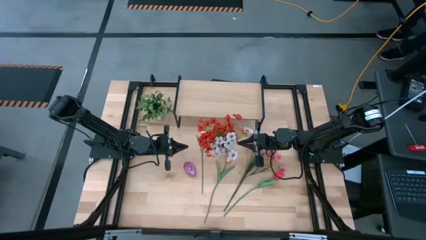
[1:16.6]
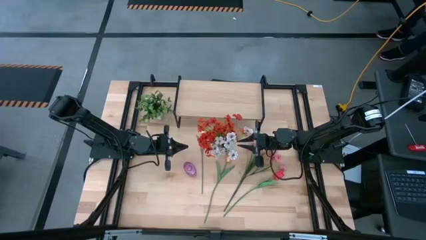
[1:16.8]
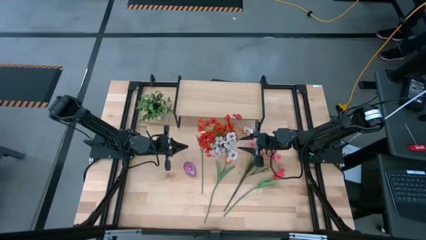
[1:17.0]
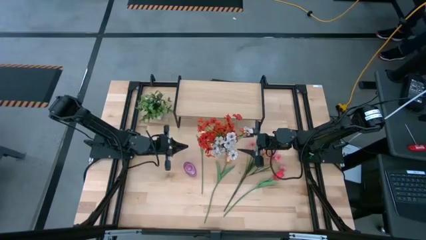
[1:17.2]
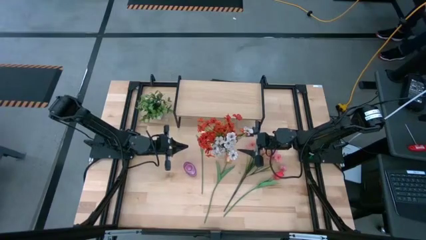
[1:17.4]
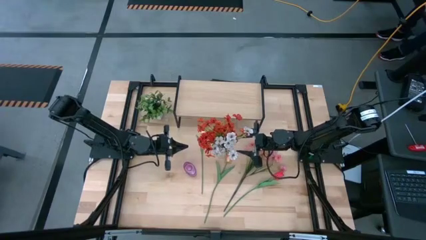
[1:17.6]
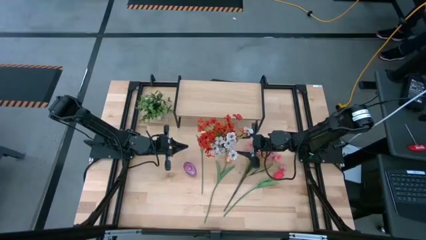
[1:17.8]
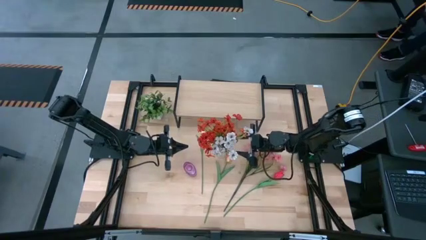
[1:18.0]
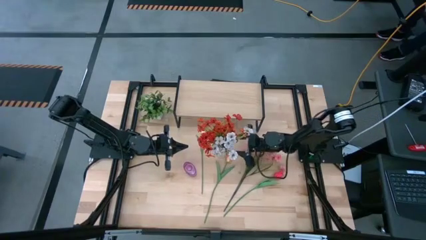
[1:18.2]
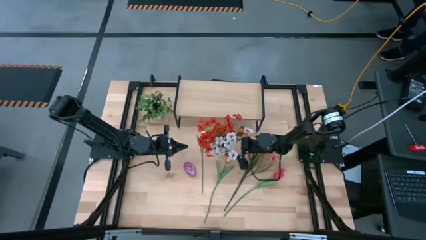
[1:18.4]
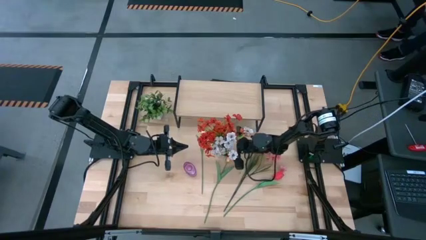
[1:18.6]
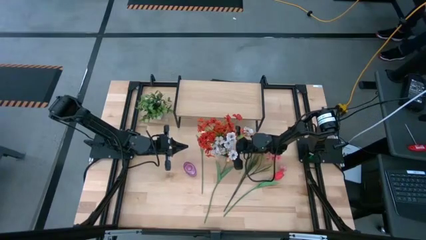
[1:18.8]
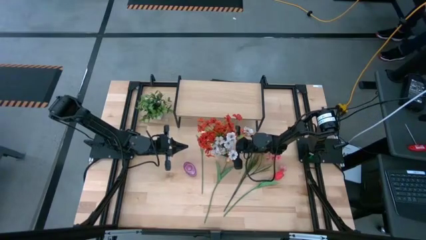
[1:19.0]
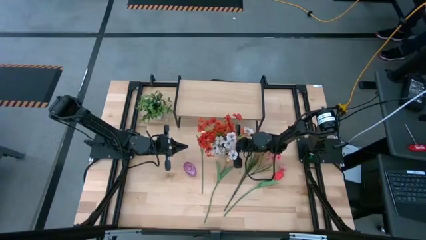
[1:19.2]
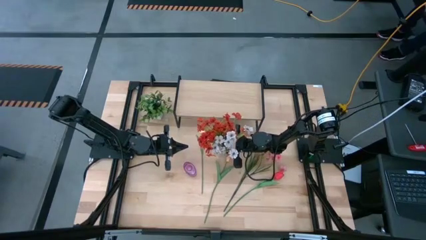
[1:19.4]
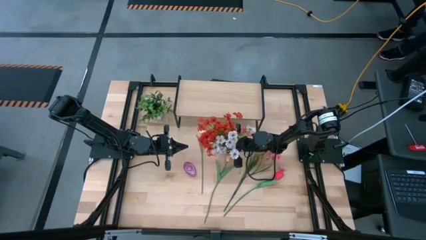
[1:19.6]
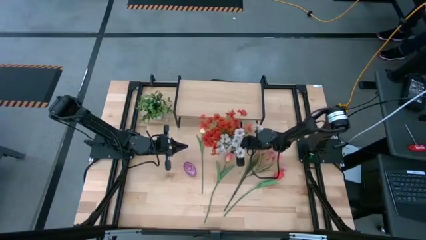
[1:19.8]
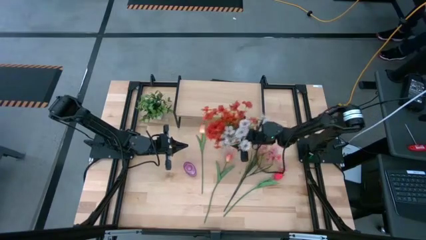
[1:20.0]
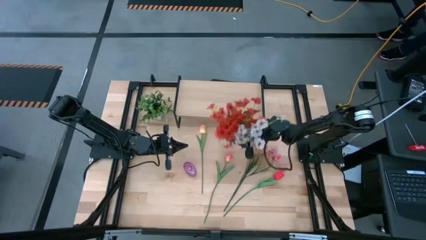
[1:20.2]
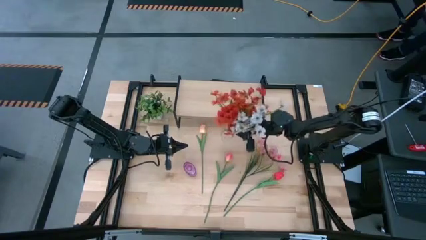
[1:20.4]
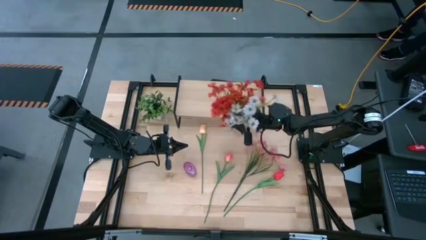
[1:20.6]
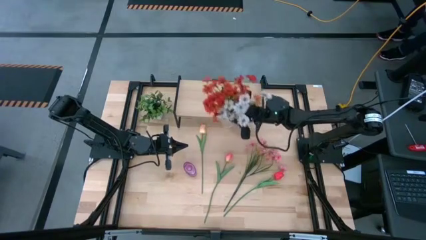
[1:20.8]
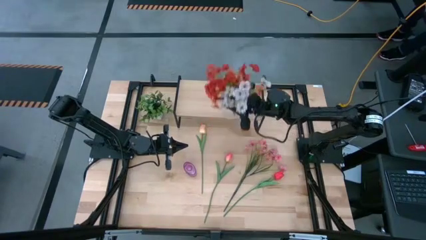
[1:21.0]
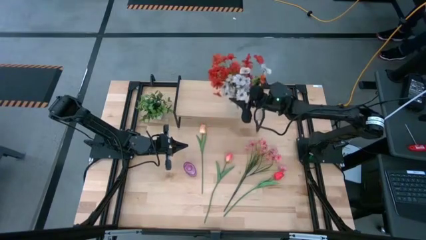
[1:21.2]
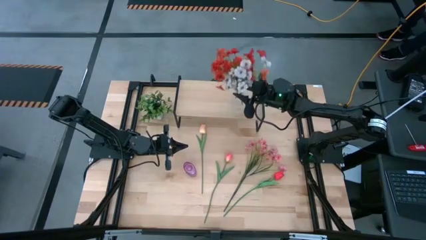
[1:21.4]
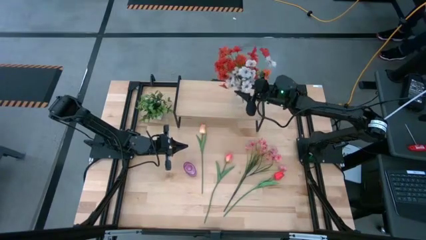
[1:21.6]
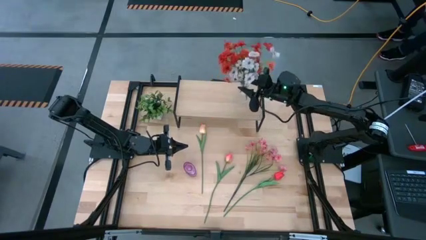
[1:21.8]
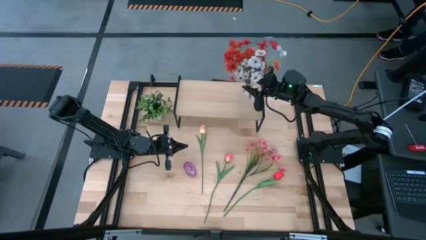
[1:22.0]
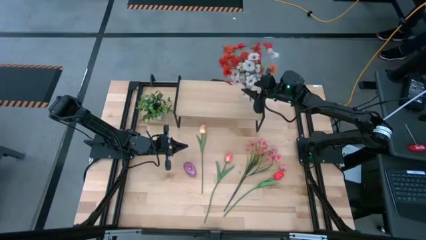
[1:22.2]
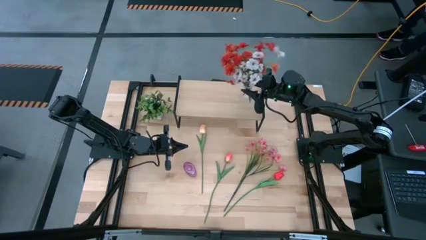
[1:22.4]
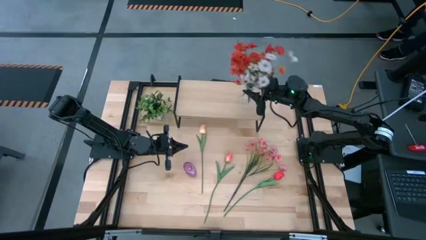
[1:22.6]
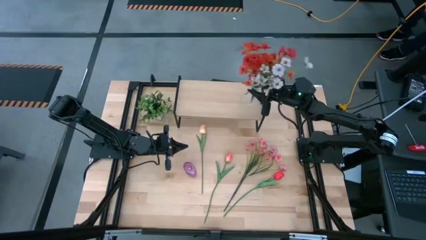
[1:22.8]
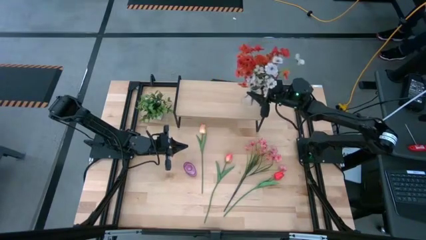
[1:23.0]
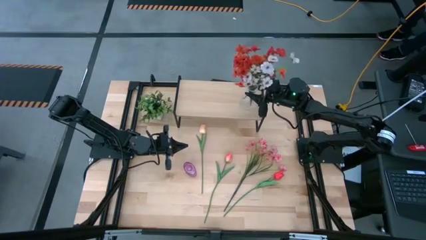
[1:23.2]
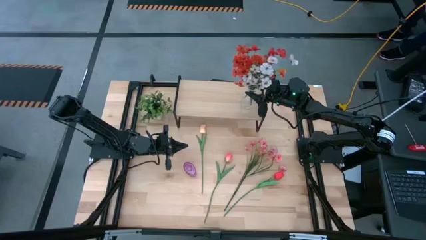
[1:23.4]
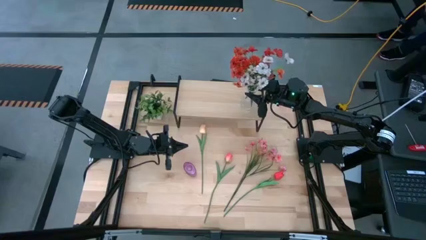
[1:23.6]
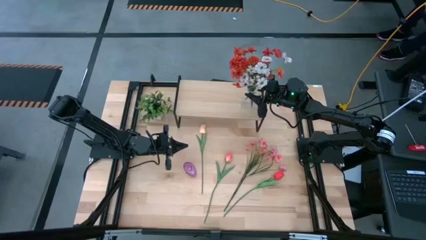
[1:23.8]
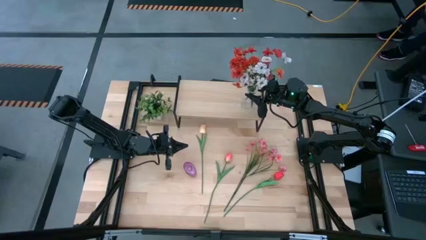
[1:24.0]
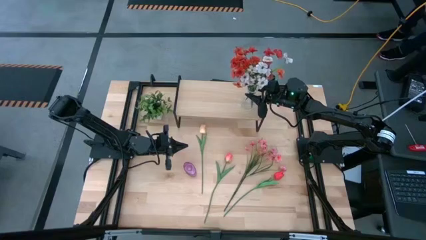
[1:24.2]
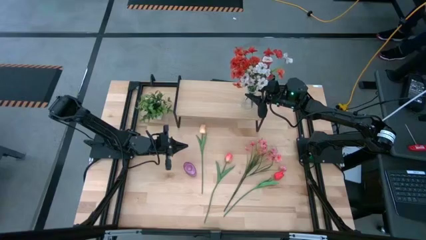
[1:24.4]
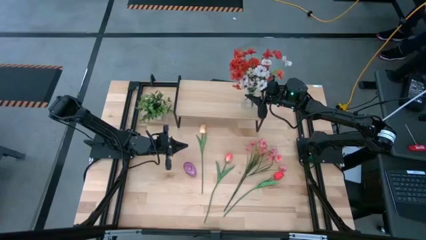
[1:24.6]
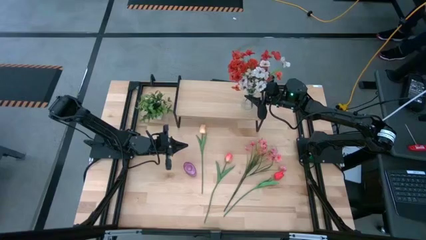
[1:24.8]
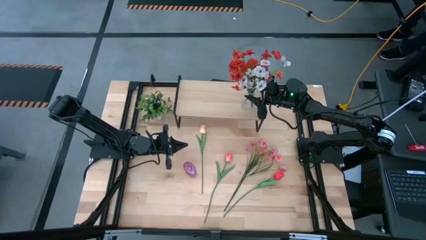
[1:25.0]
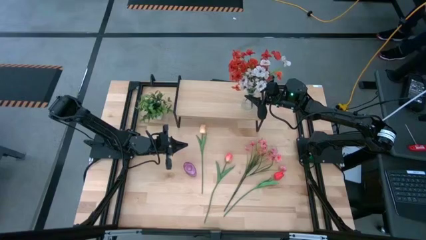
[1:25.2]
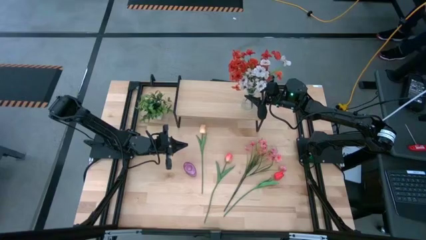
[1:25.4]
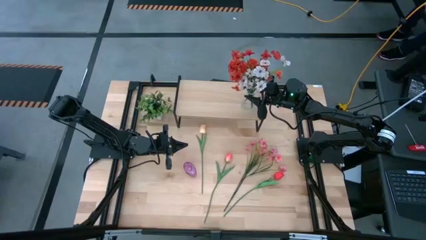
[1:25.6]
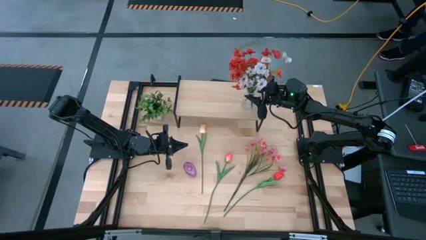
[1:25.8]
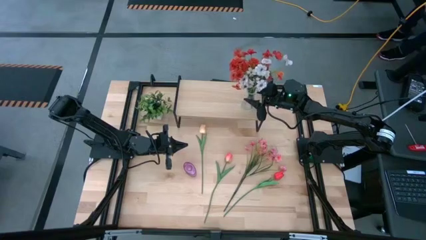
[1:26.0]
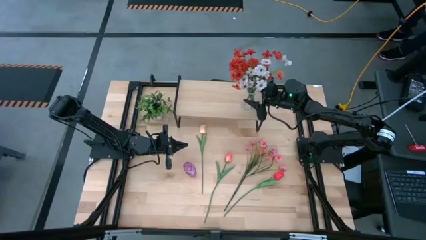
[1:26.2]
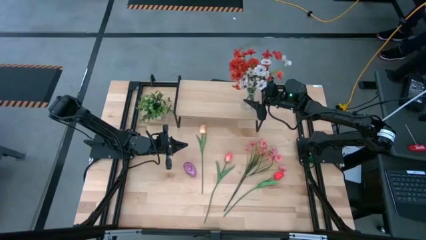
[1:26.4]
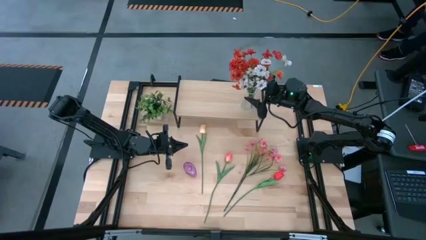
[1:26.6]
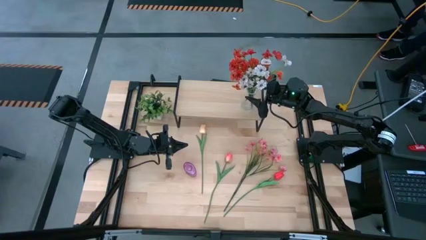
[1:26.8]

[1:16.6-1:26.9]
Task: Pick and place flowers into a vace then onto a shelf
Put the transparent vase with flowers on the shelf

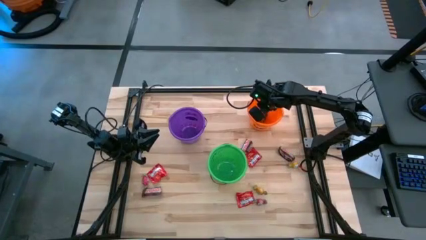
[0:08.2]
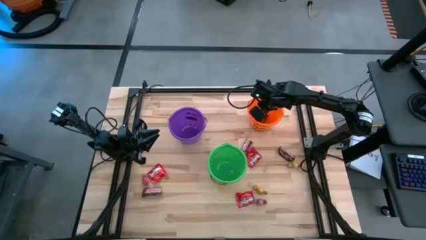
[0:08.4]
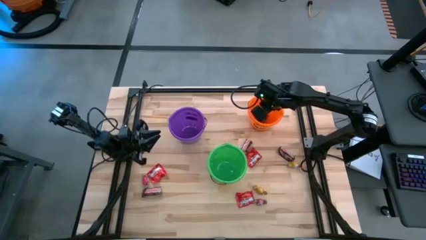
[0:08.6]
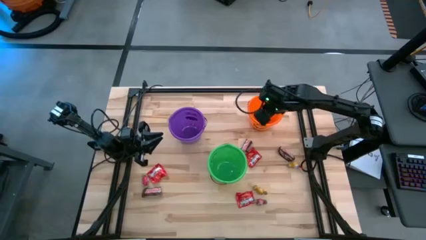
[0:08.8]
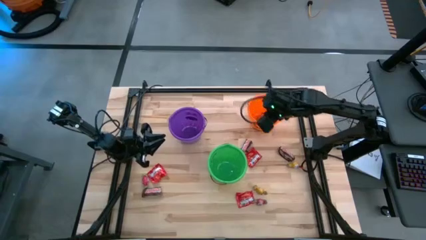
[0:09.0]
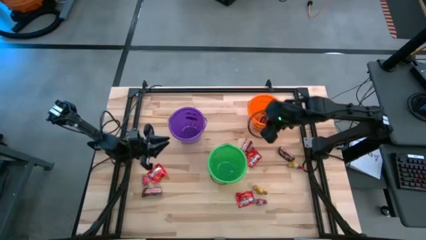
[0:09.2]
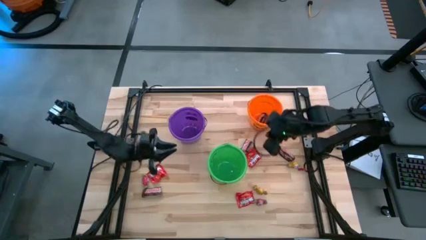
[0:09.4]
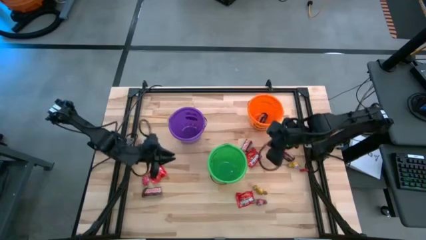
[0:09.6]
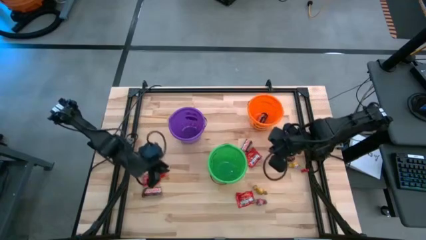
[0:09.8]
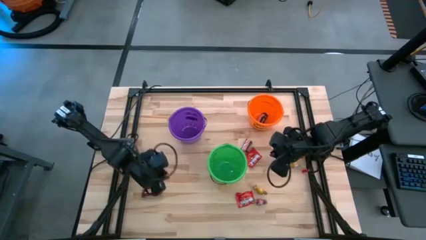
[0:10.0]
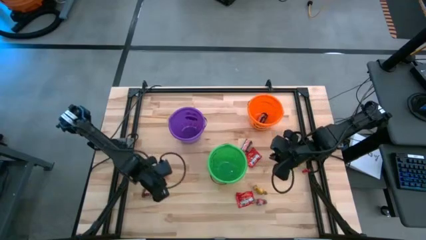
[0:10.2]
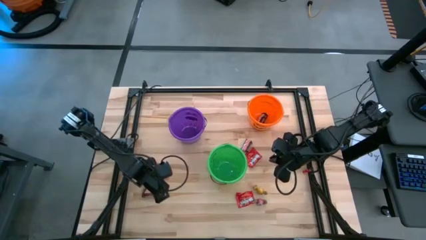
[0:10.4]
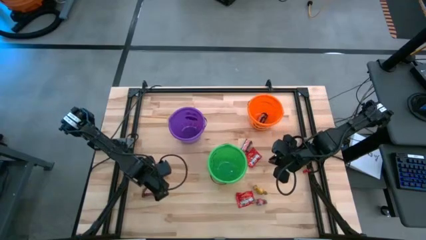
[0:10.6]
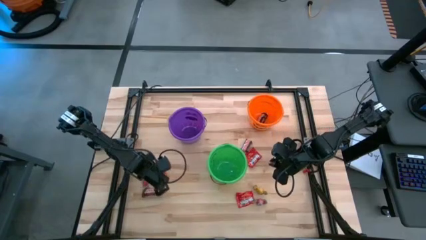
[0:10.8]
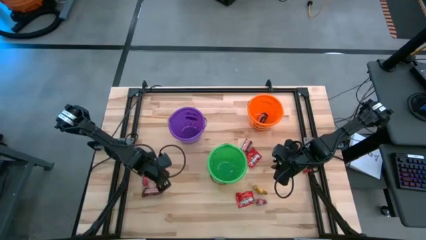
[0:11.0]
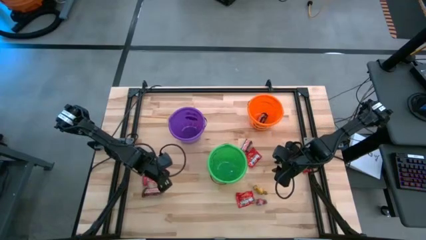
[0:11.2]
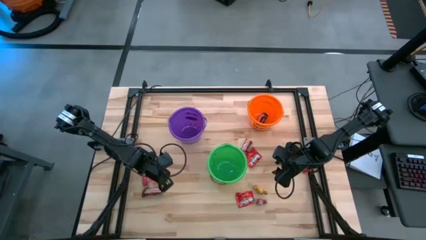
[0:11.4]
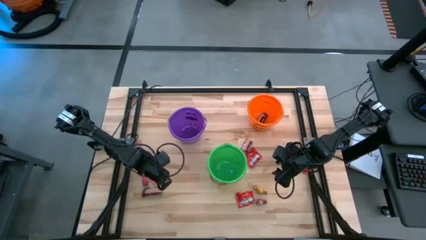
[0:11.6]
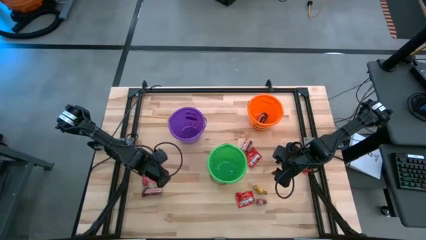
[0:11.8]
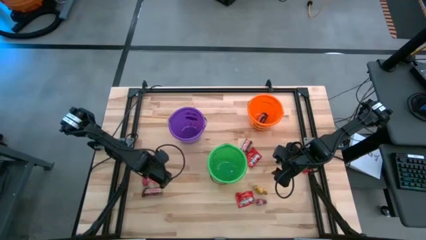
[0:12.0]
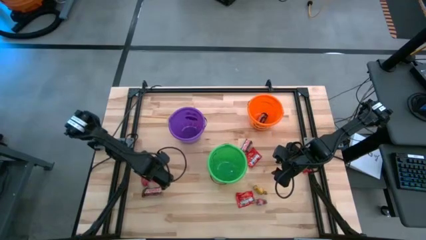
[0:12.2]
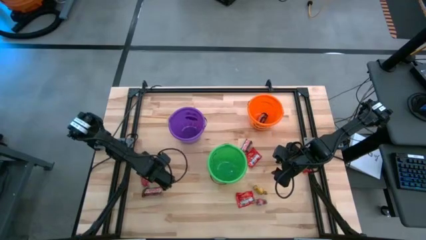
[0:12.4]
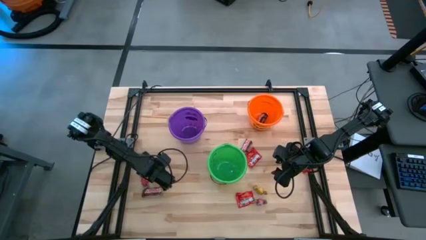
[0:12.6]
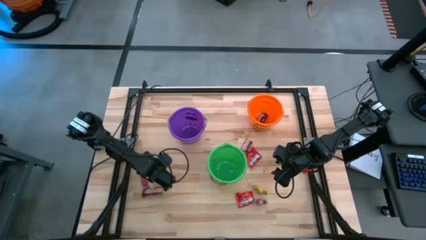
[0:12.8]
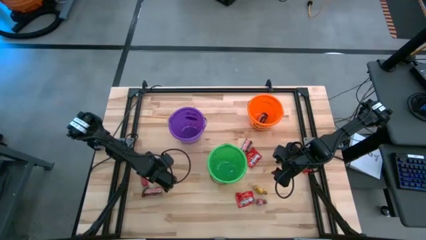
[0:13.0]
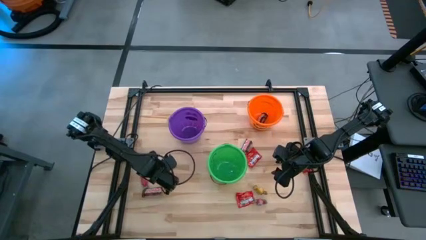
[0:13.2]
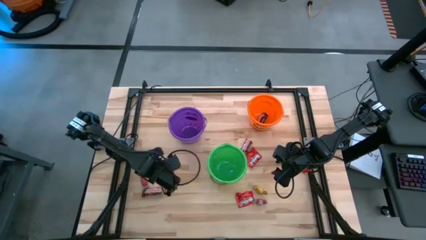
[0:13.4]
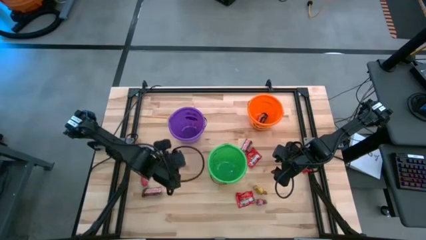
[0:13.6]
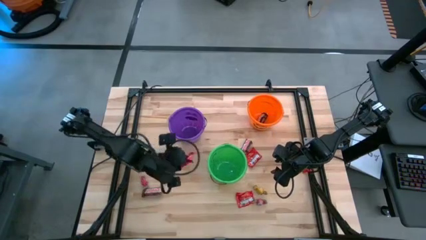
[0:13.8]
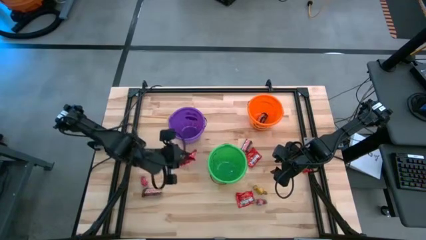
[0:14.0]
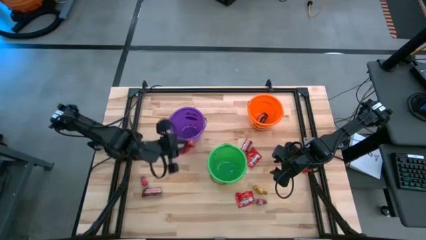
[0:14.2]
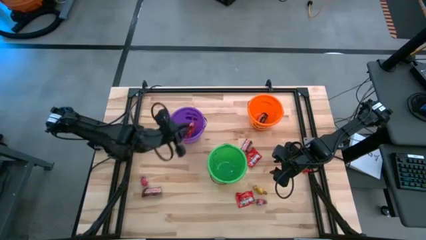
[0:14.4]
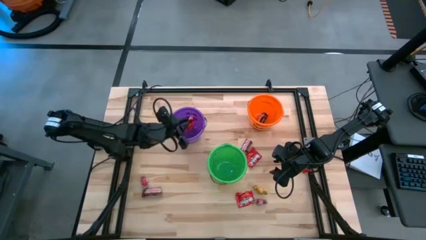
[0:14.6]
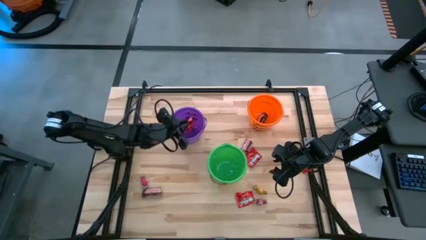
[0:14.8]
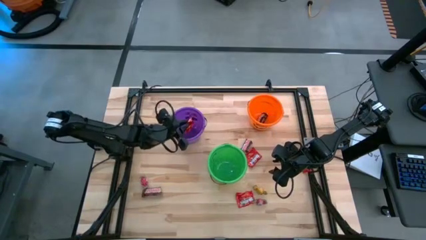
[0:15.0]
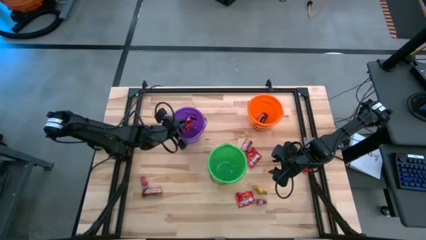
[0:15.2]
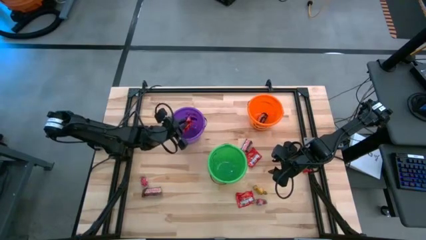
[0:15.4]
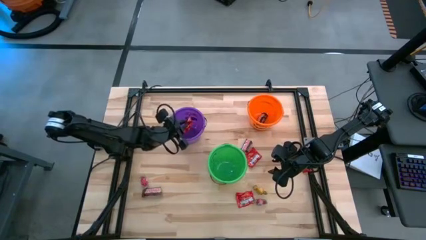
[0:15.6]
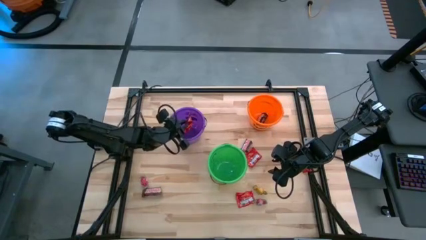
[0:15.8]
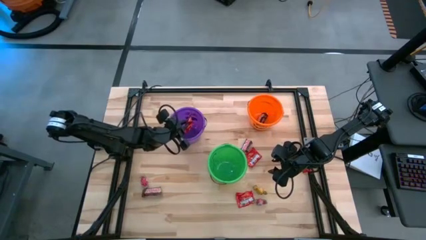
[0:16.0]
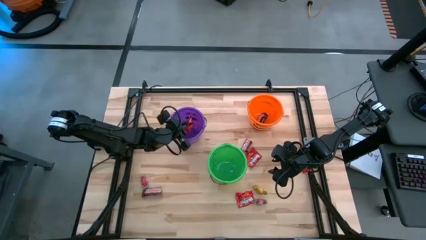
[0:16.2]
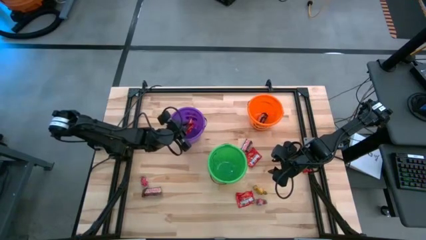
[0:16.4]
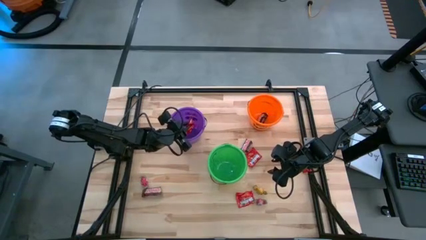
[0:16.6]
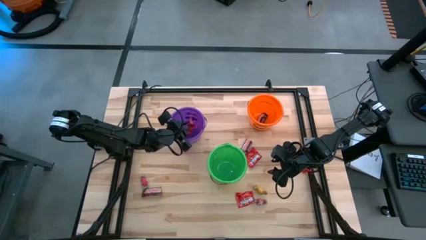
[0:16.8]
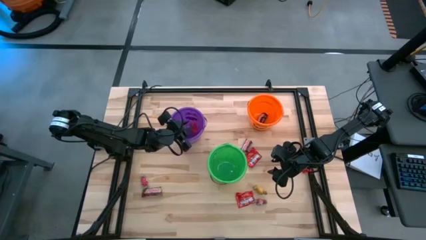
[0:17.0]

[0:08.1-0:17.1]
Task: Organize candy in baskets
Put the red candy into the purple bucket
